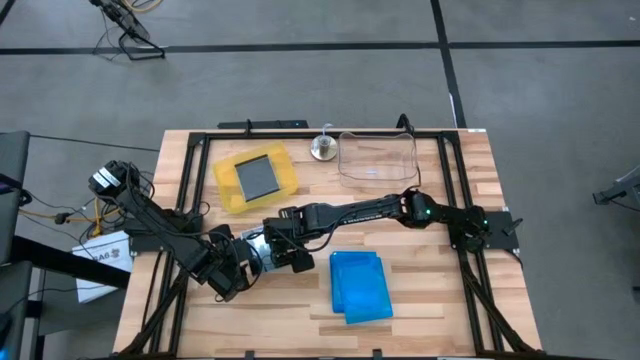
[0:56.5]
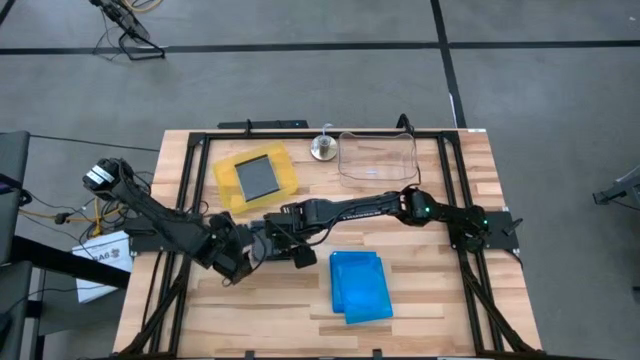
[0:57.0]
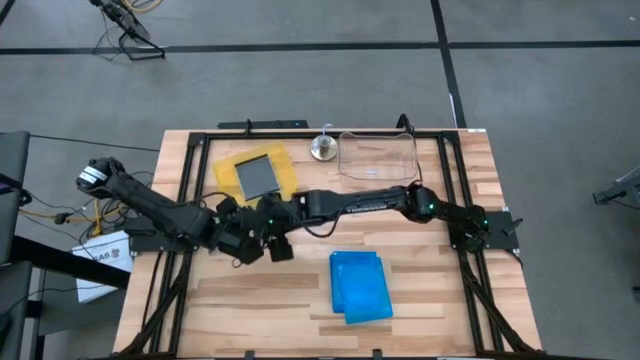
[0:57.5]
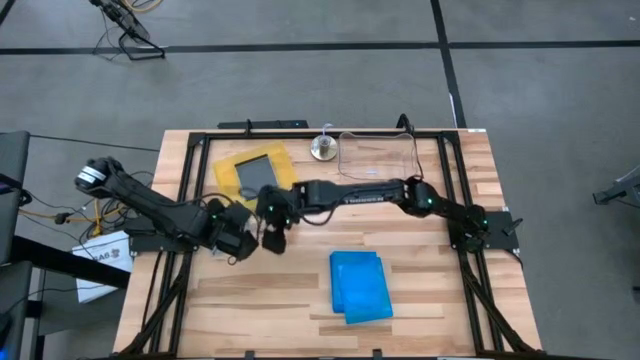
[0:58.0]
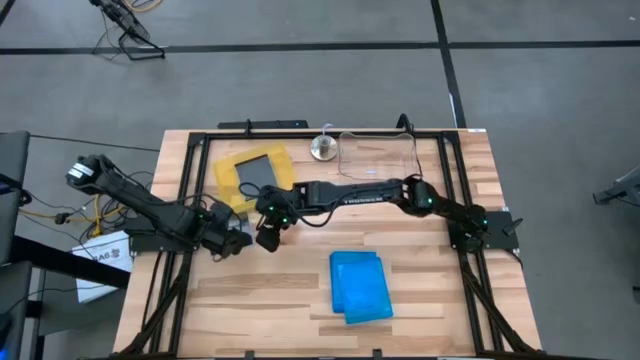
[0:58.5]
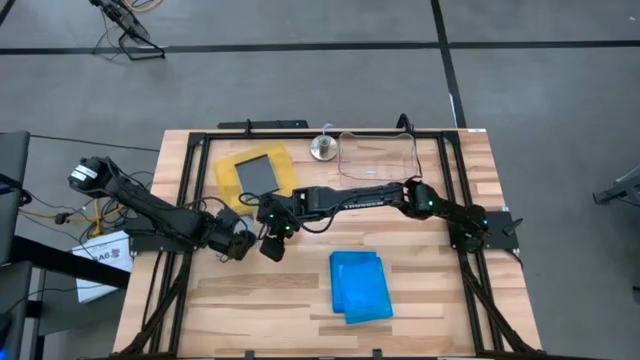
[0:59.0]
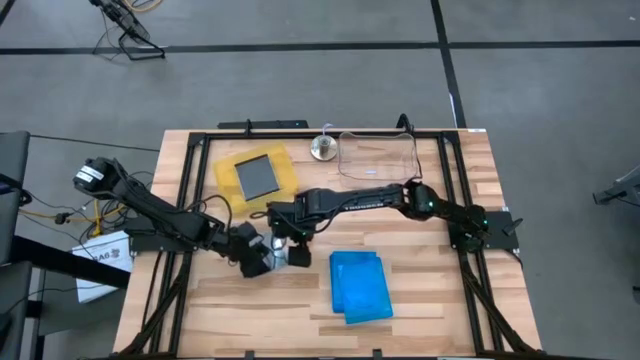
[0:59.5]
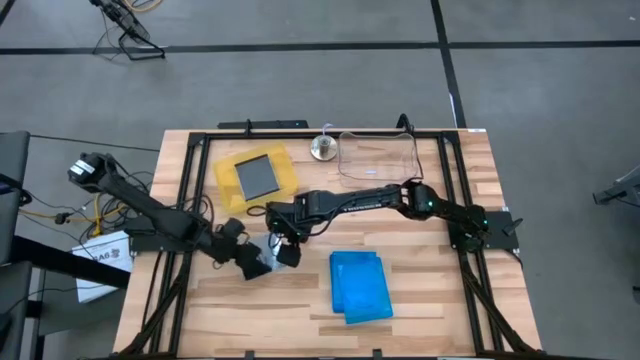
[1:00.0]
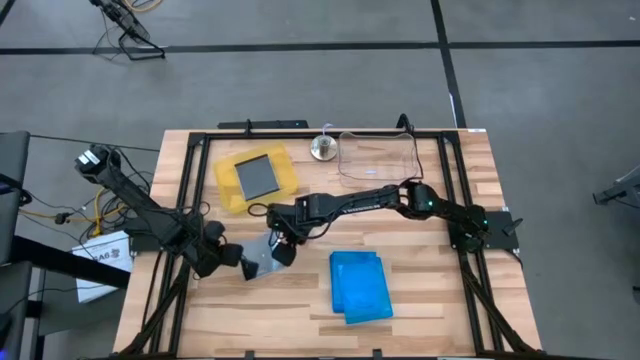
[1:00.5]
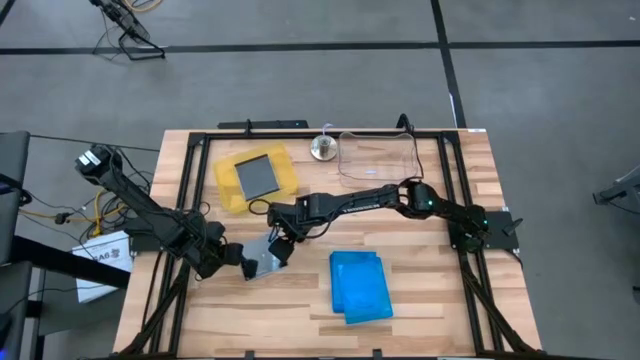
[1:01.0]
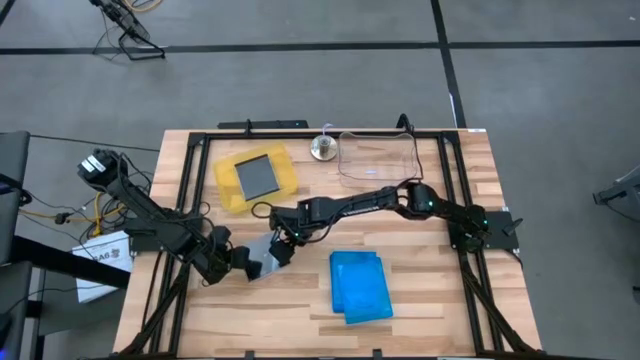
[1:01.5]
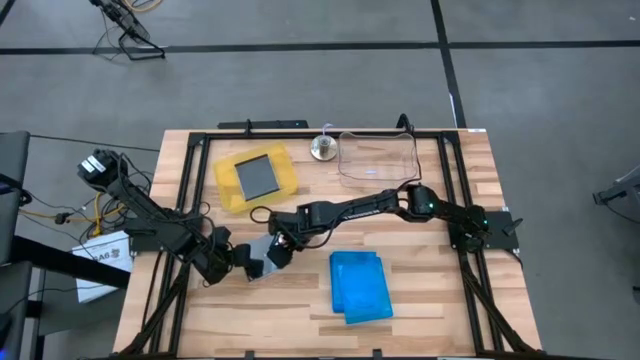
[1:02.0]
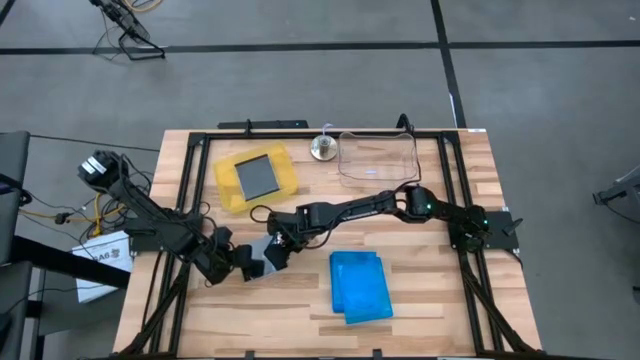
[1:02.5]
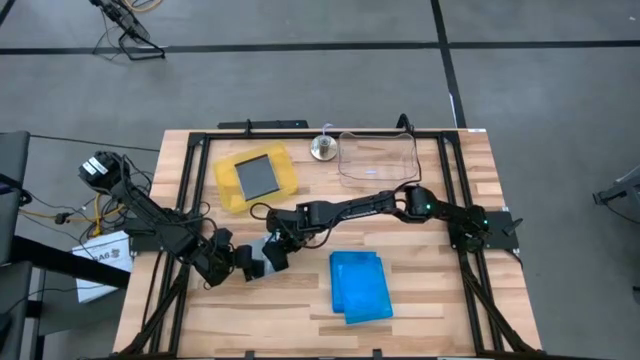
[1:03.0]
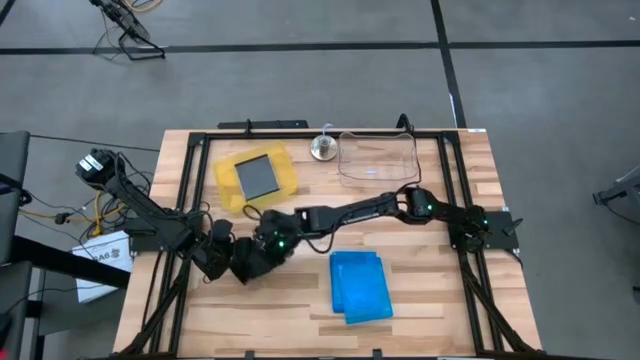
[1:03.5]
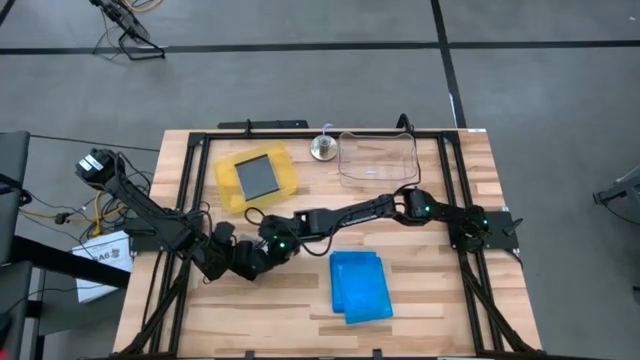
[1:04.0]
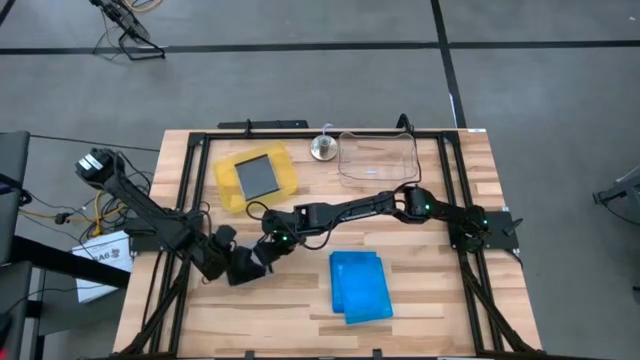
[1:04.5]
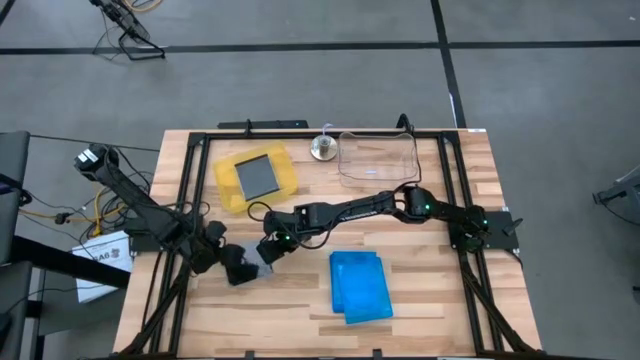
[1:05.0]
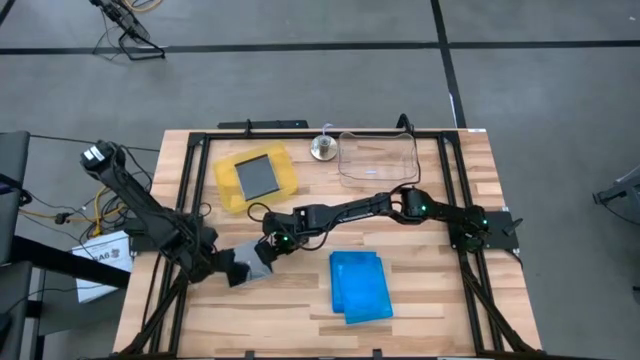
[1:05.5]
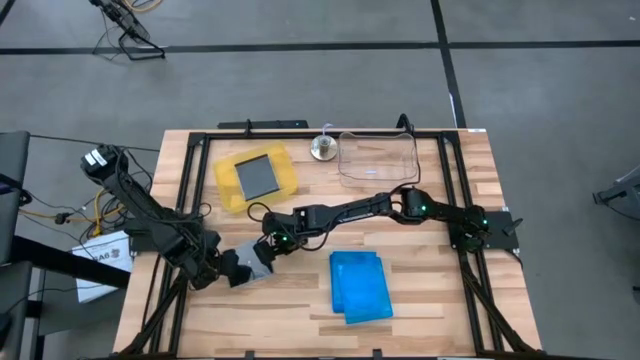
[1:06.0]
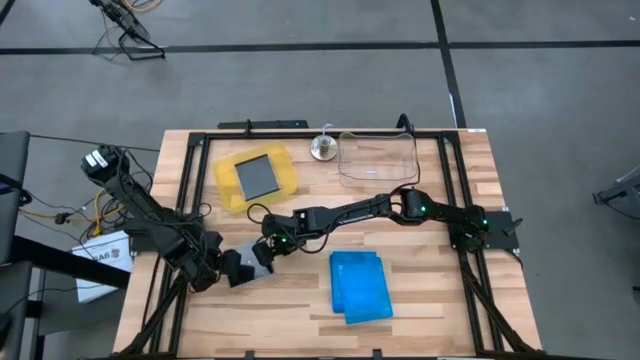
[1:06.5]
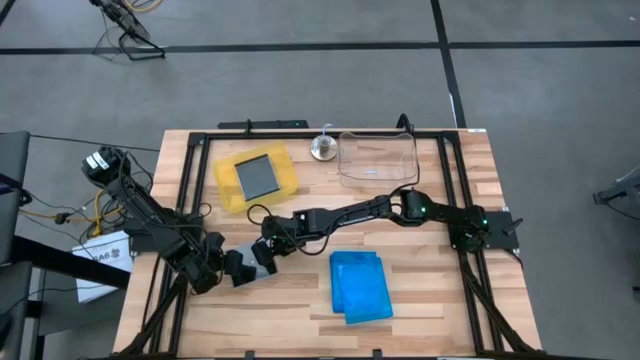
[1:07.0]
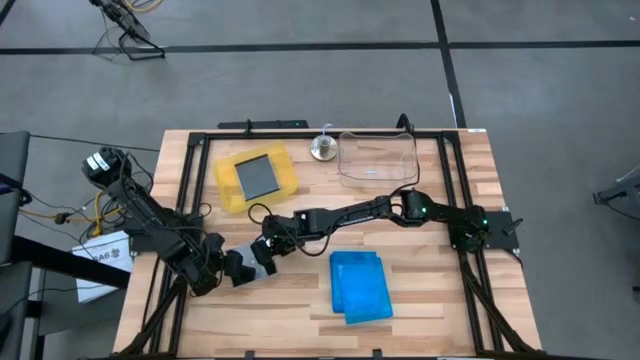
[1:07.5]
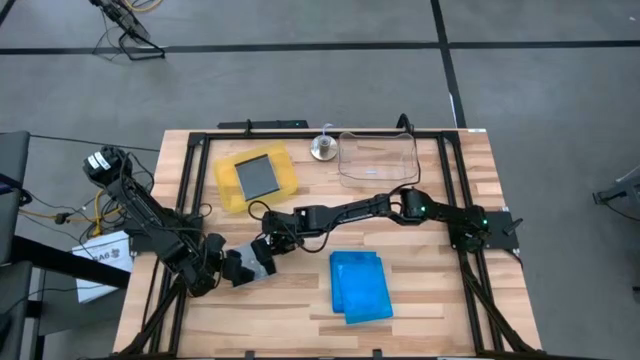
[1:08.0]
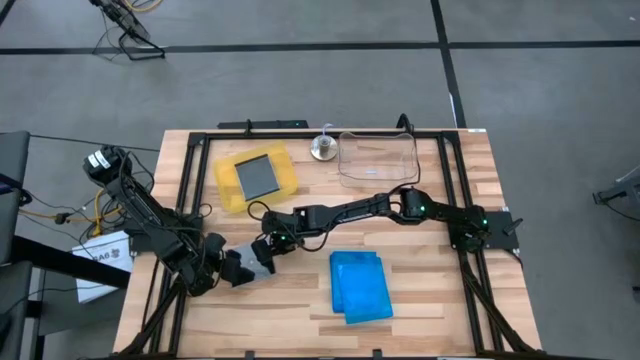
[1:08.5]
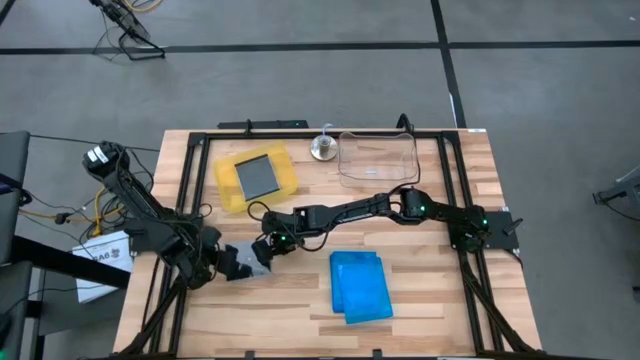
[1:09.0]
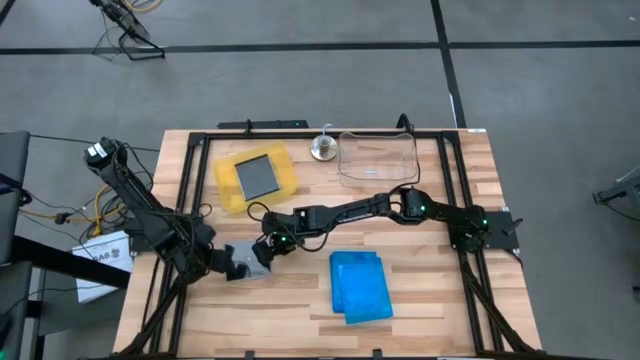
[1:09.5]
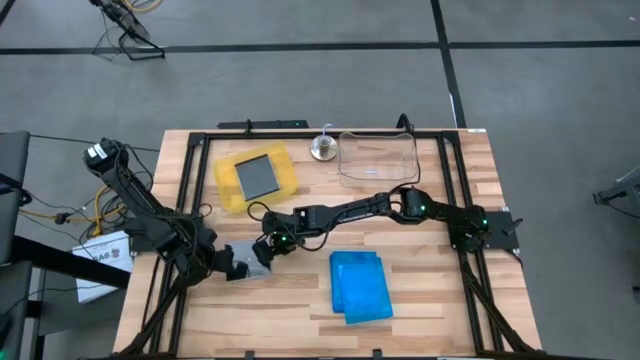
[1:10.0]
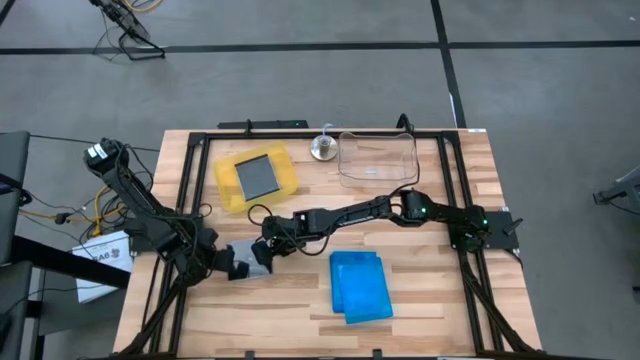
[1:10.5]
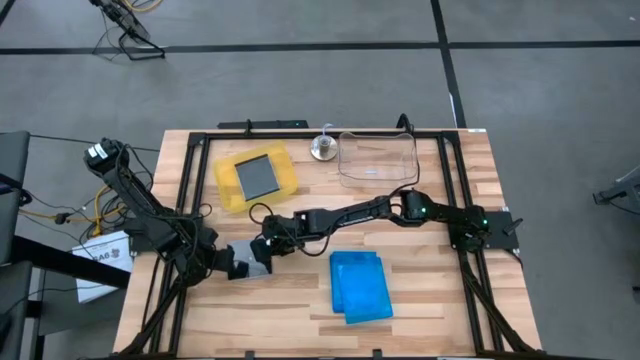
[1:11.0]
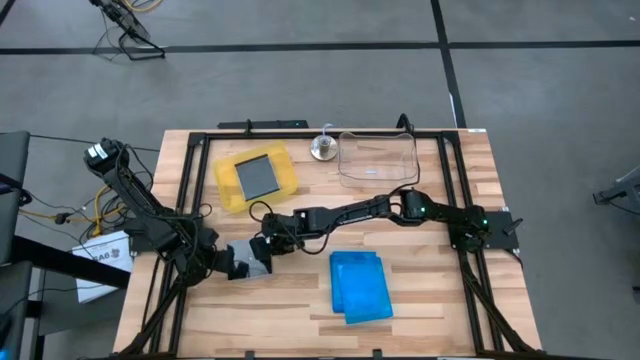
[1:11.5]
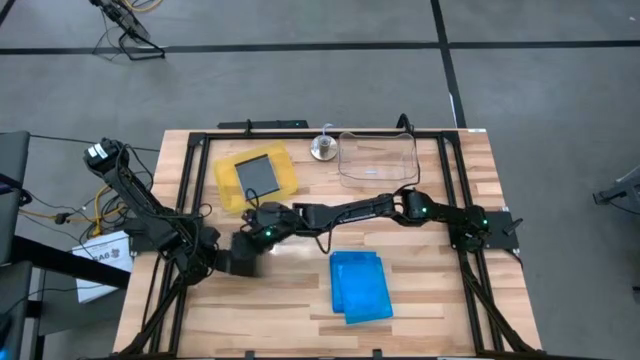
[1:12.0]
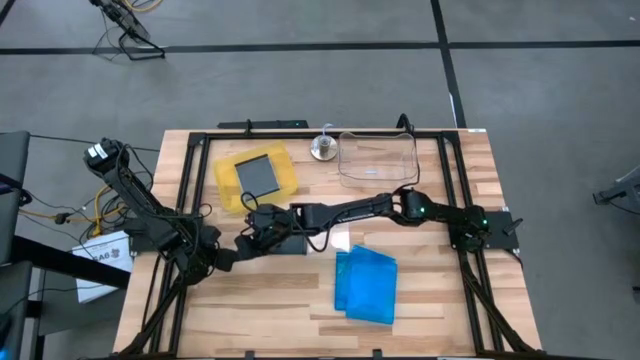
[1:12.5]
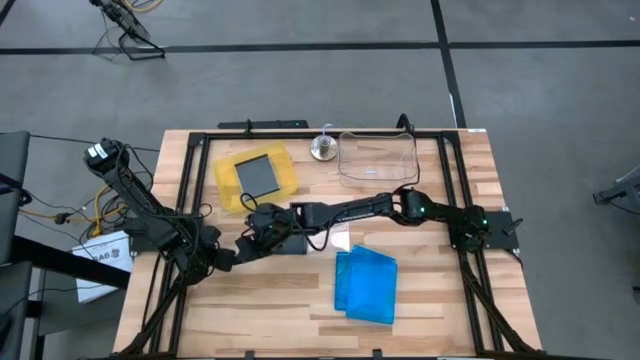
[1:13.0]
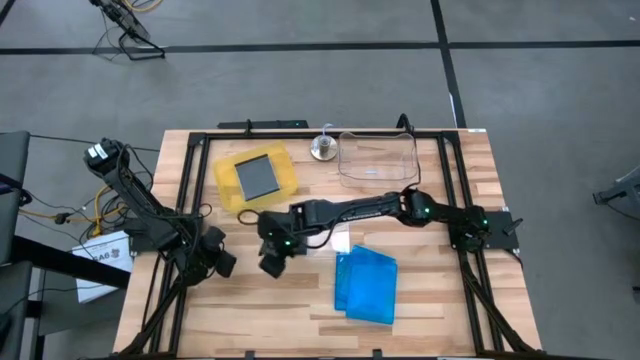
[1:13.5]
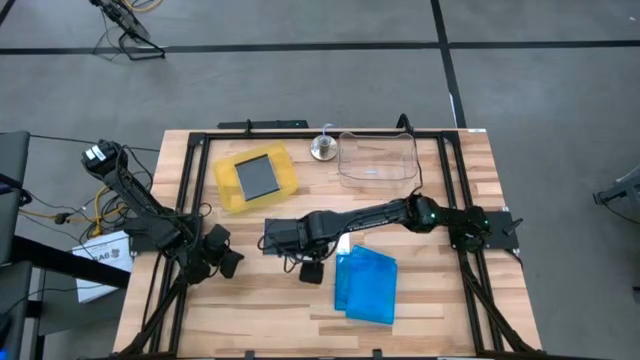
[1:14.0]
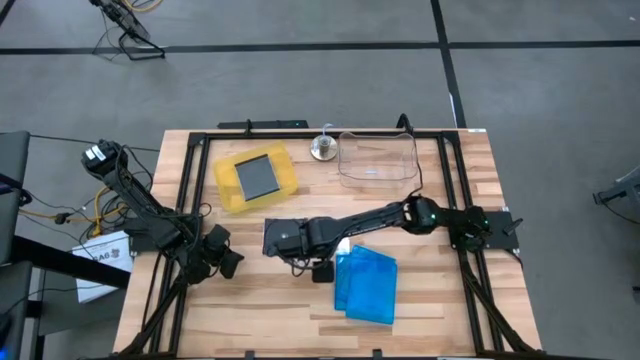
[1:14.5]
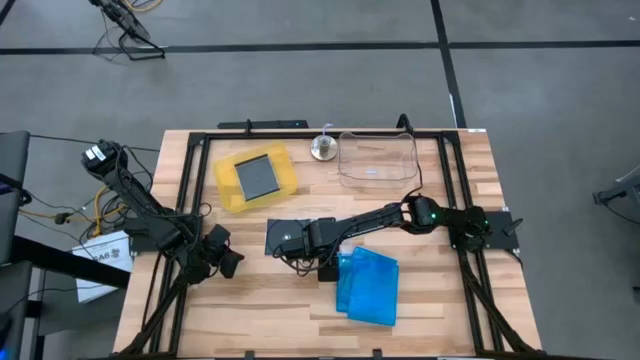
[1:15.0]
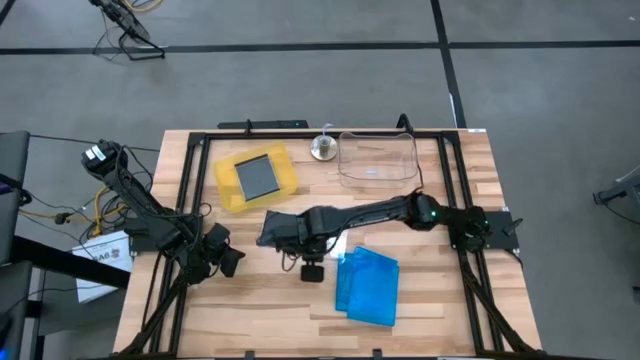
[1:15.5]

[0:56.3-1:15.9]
Task: Pick & place jewel cases by type
Put the black CD case into the yellow bin
